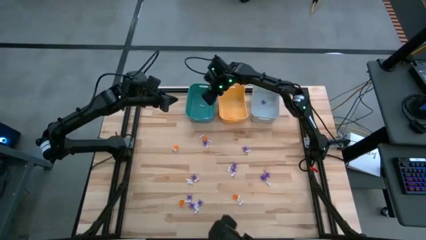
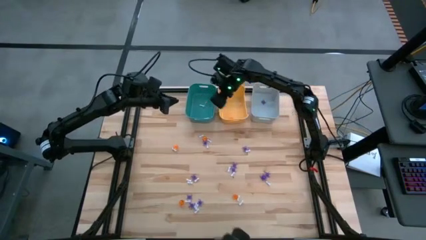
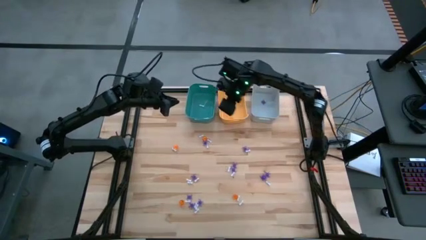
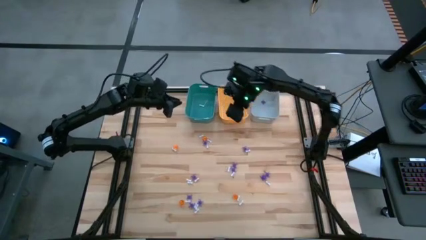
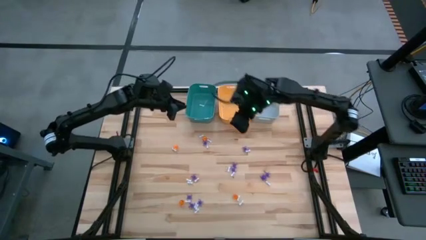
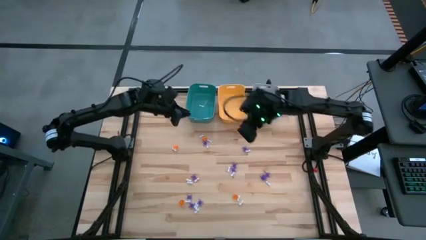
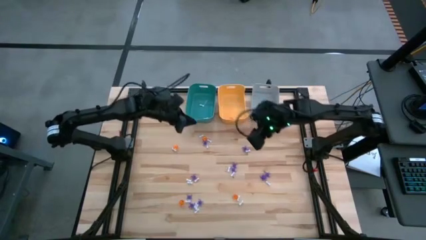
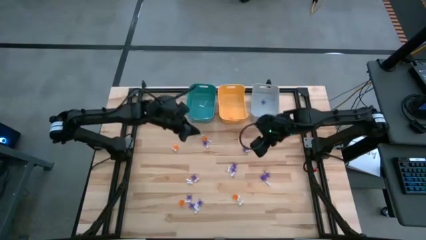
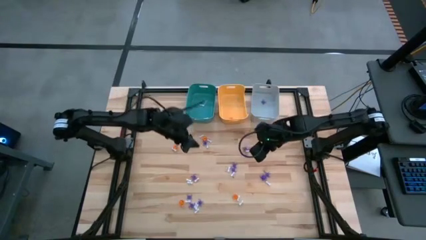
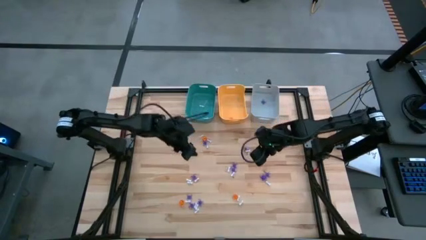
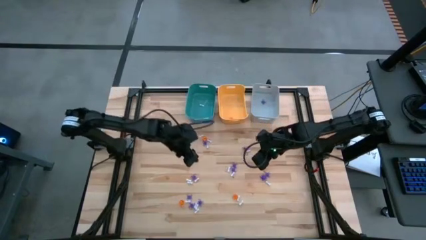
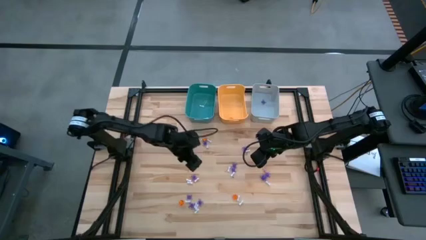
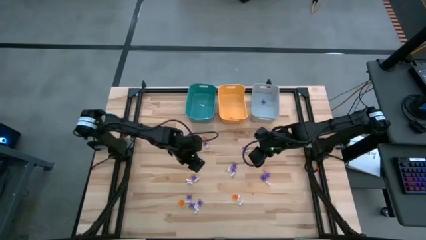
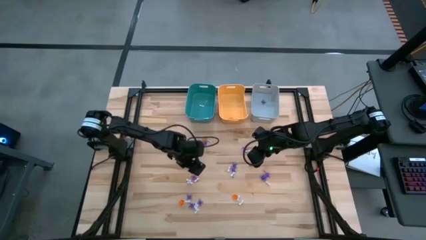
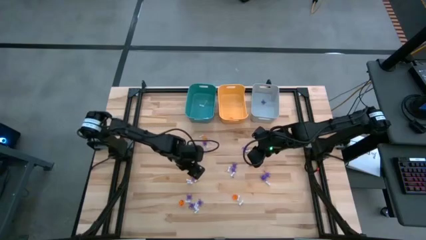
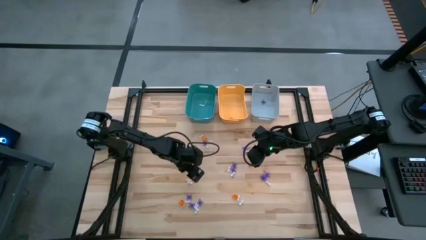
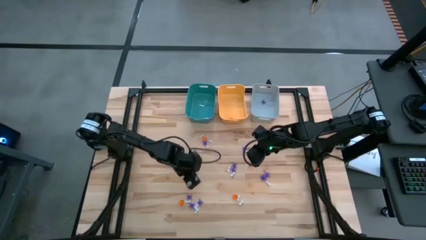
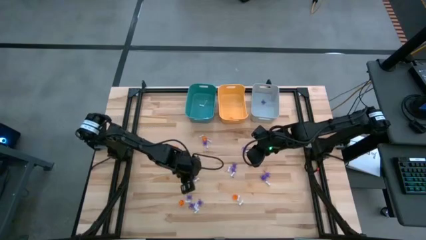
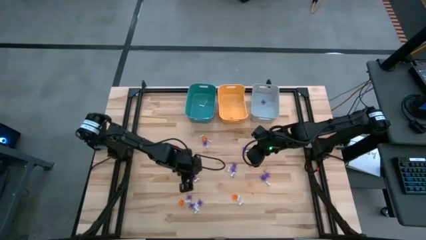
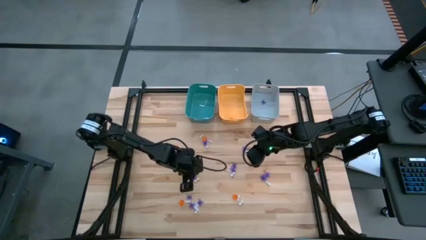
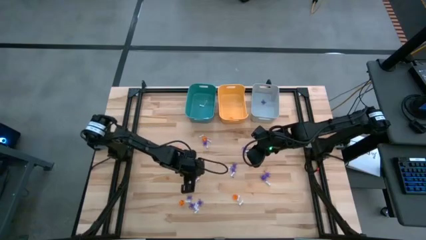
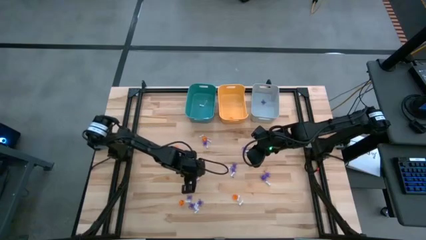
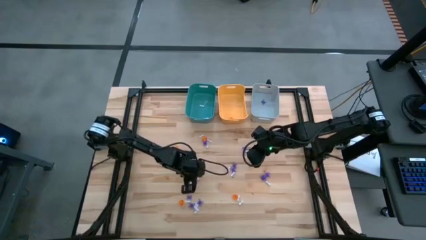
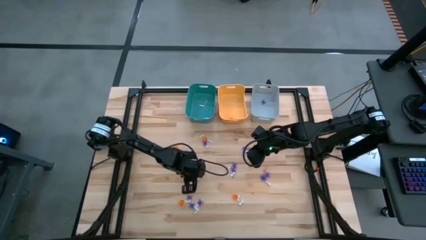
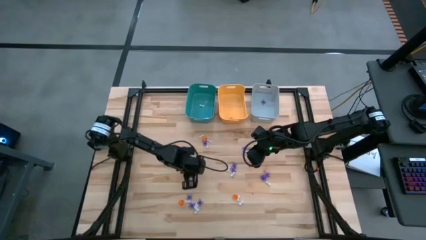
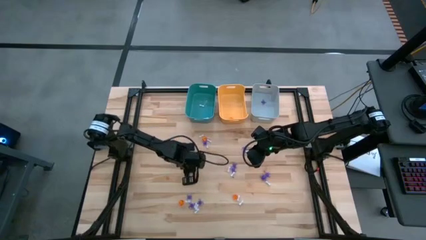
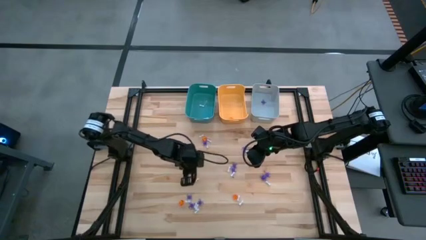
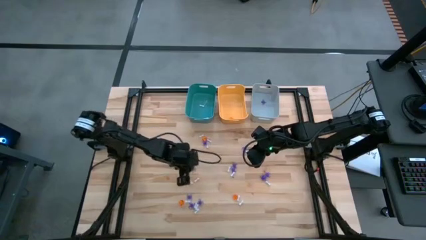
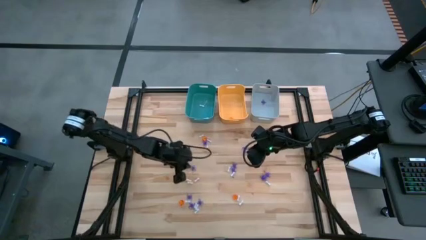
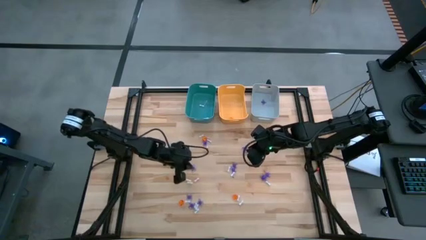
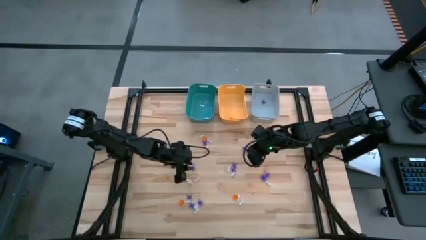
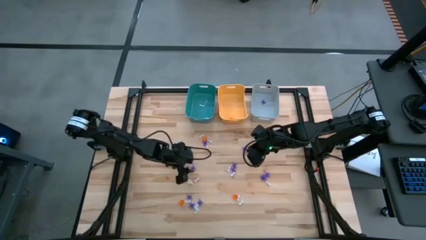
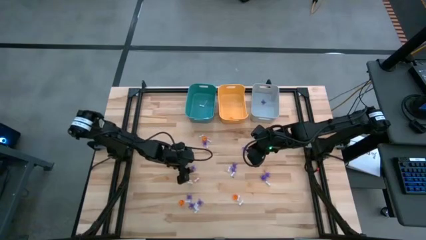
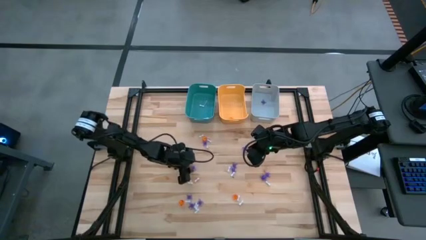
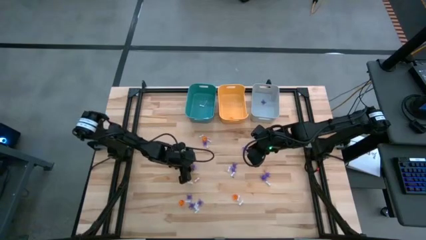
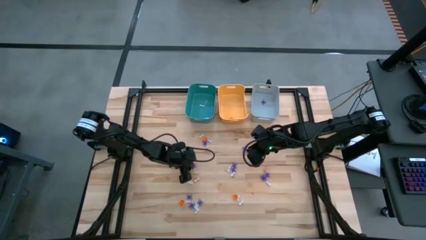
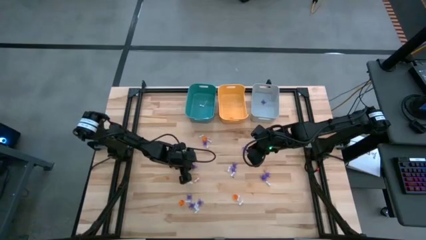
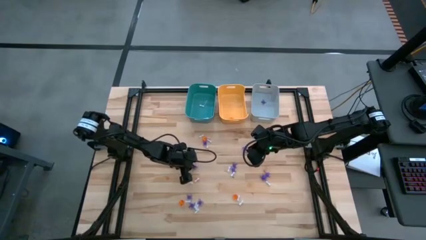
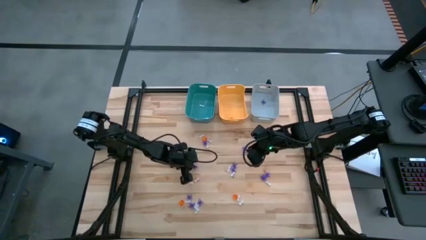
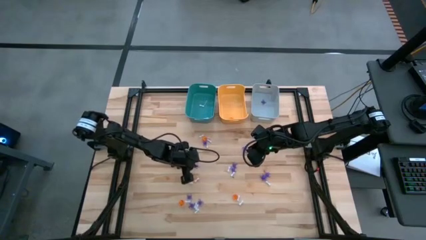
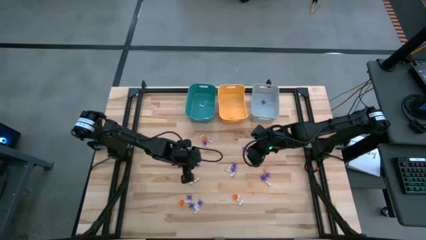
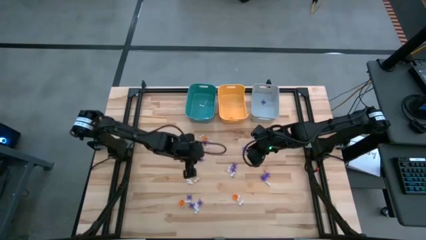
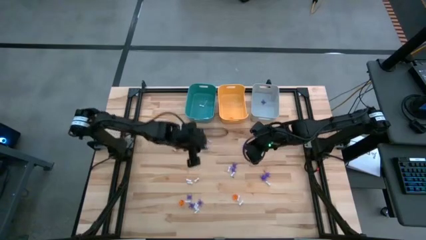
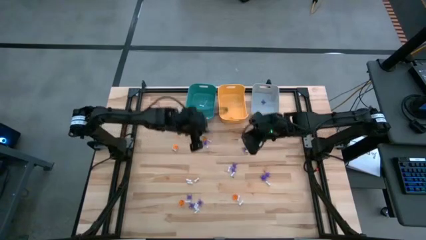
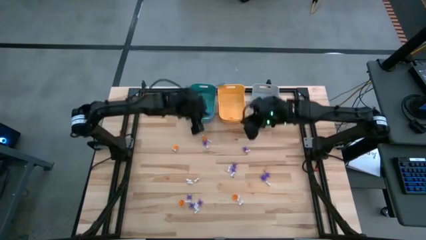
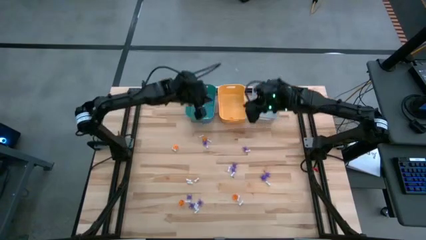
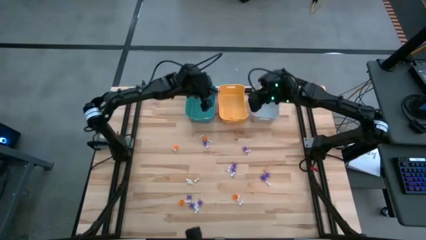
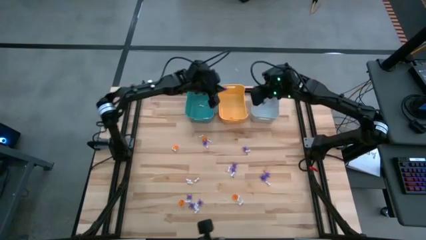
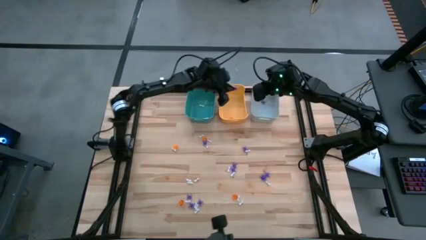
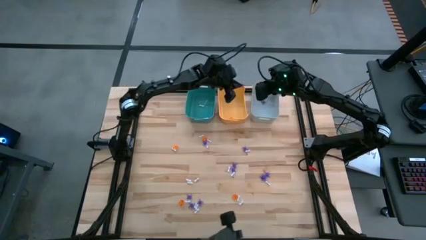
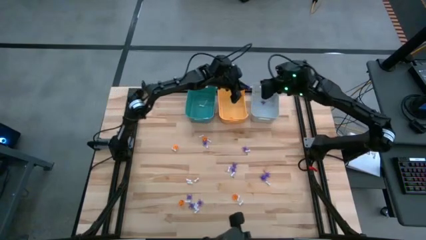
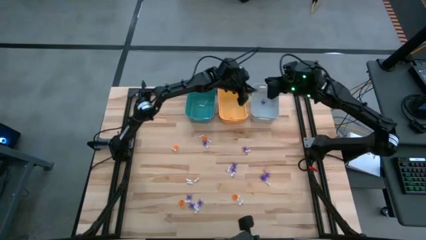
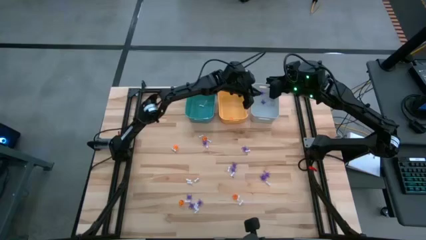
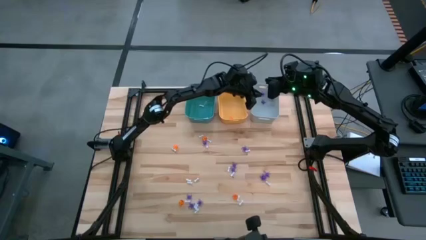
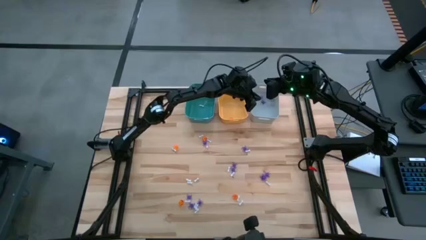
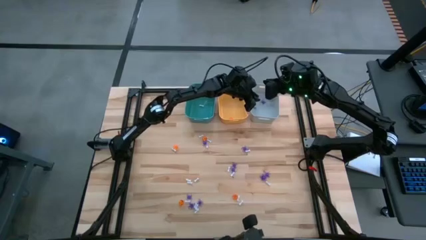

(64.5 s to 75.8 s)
Task: Sort Halloween decoration
Put the purple spider toy into the gray bin

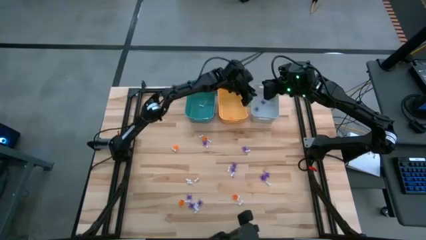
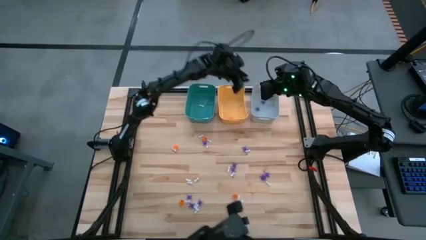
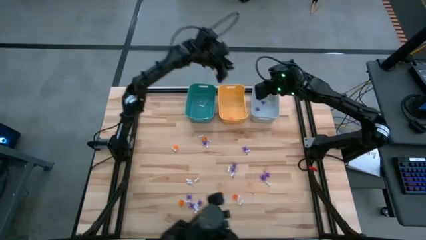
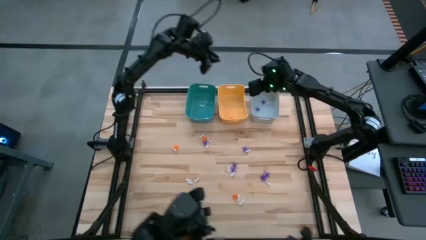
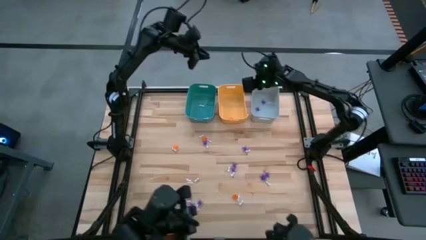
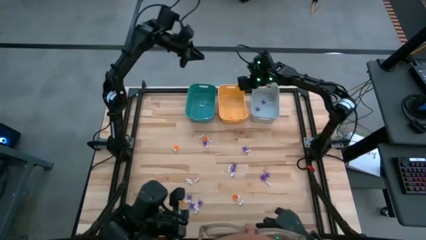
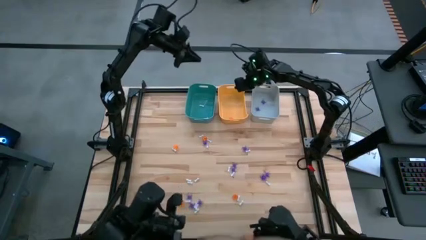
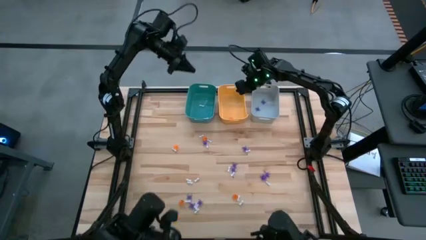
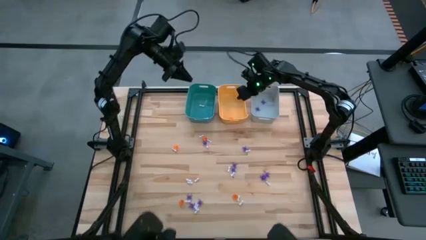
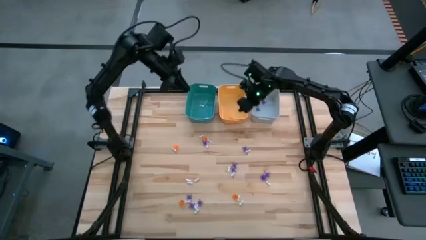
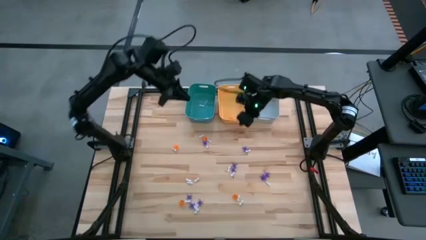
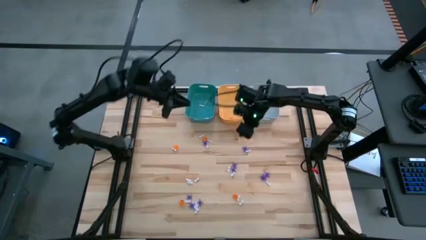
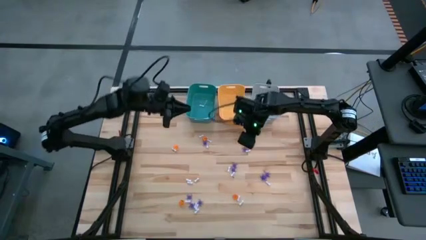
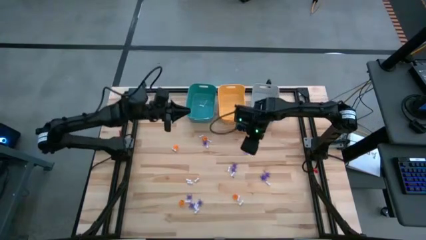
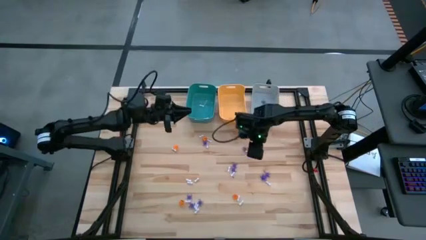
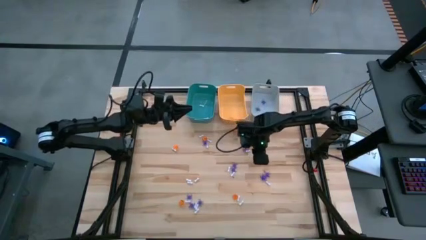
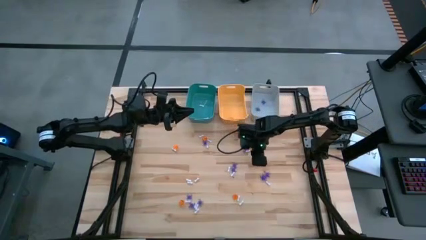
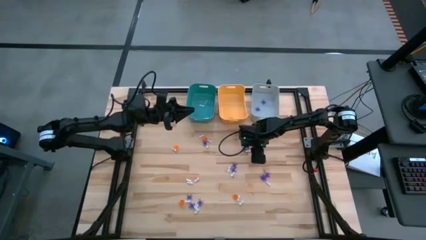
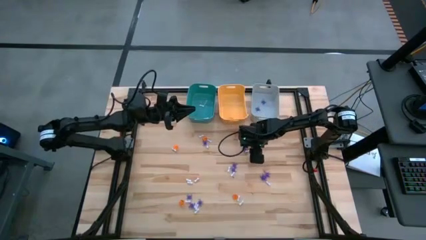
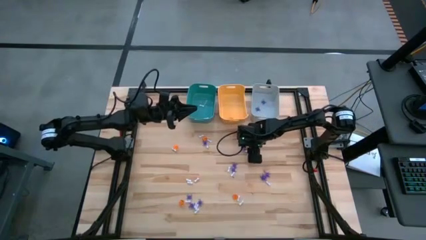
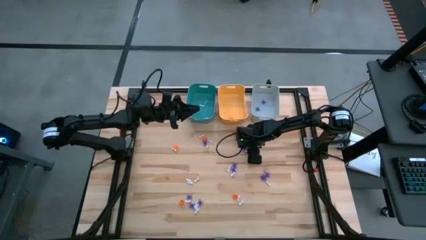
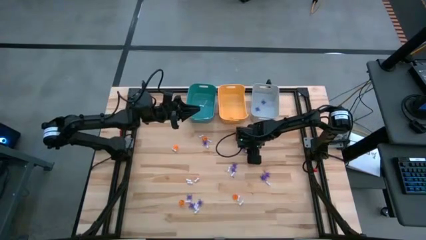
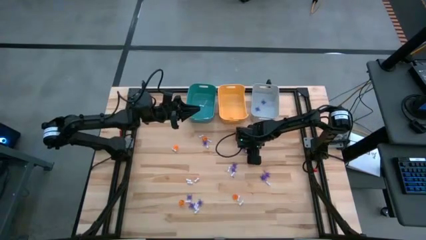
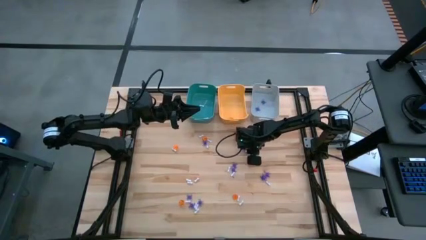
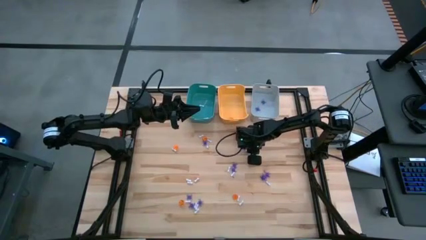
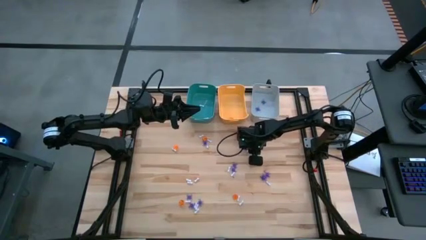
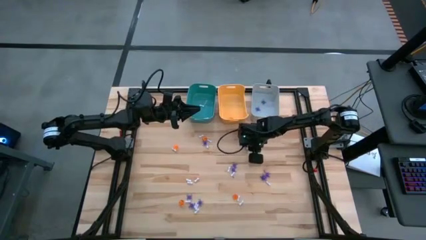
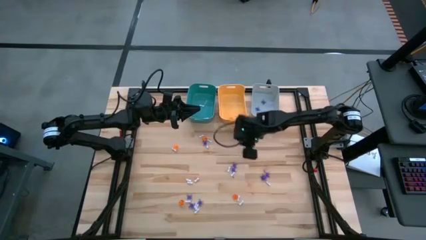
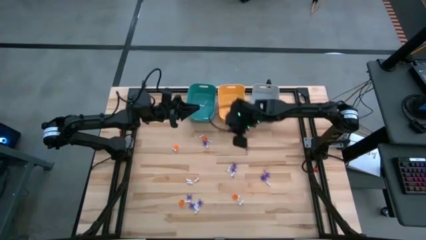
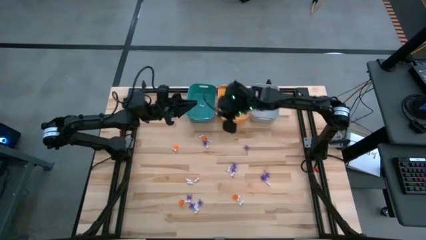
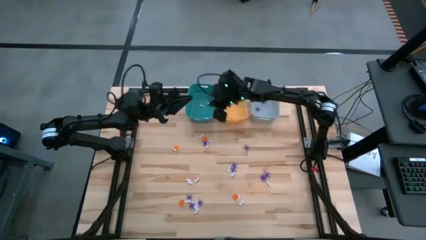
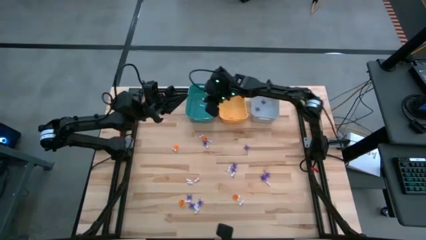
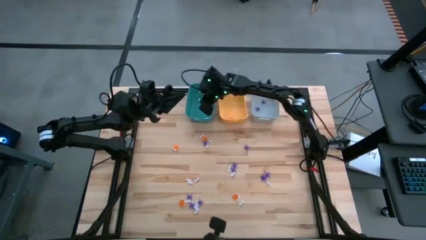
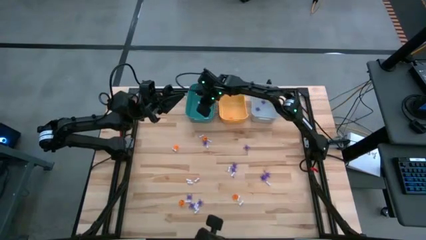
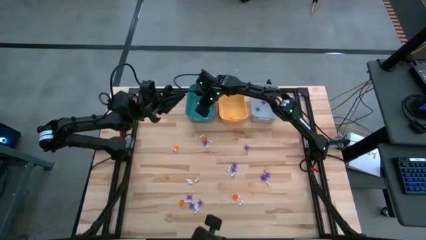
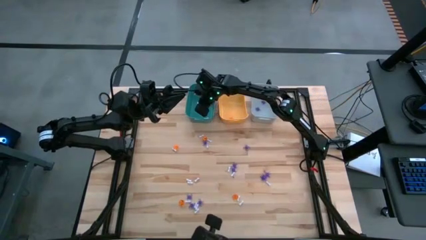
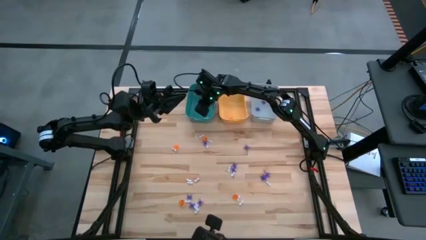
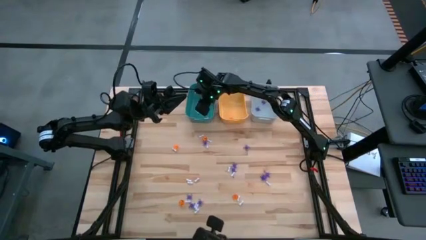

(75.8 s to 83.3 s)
Put the white bone toy into the blue bin
